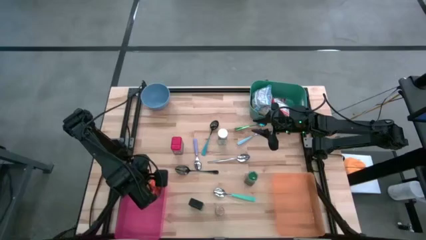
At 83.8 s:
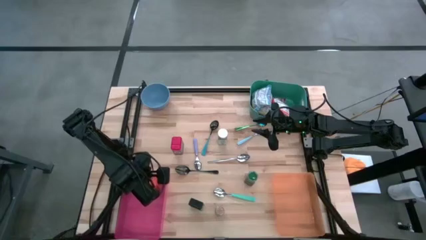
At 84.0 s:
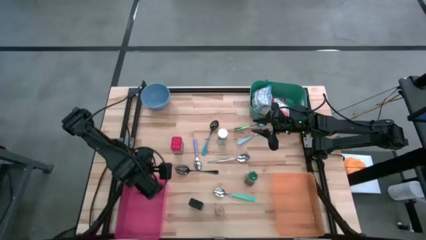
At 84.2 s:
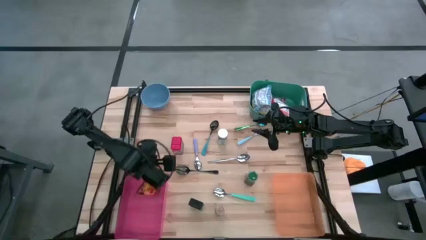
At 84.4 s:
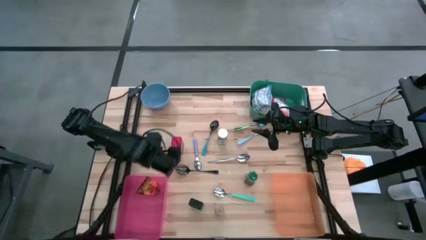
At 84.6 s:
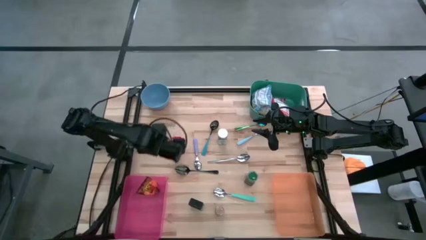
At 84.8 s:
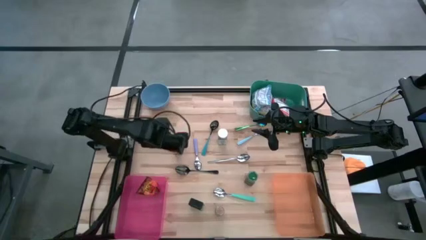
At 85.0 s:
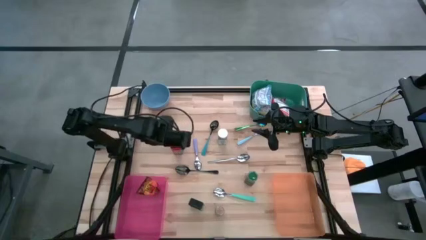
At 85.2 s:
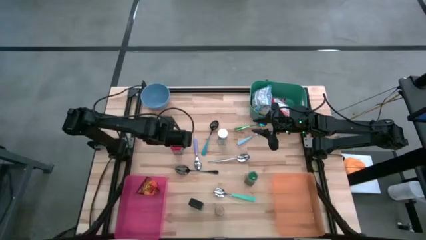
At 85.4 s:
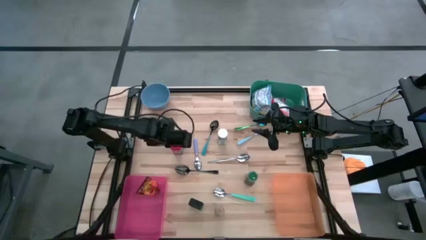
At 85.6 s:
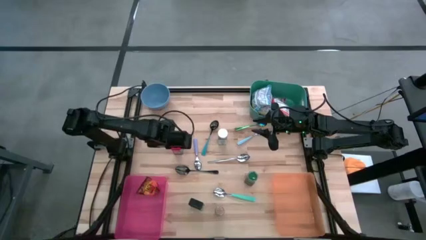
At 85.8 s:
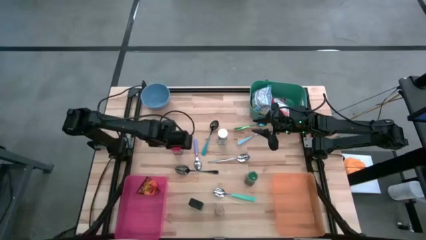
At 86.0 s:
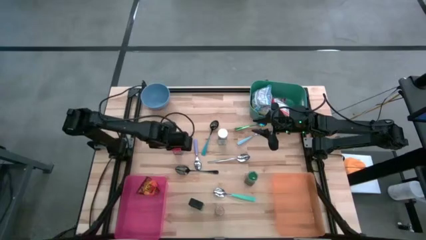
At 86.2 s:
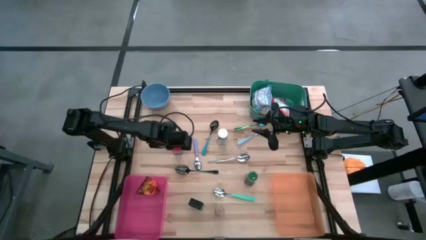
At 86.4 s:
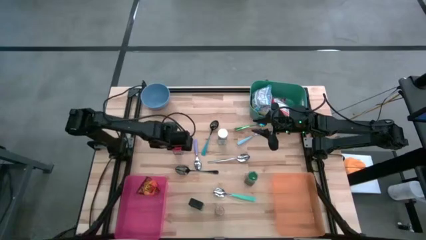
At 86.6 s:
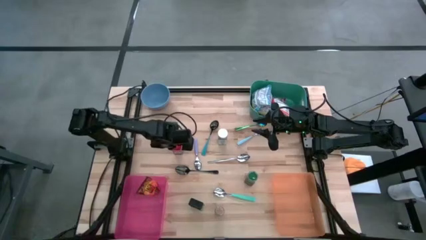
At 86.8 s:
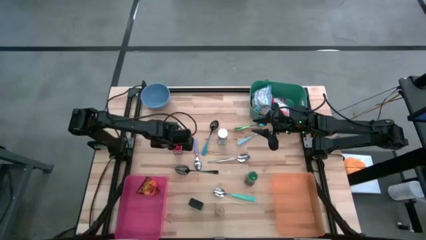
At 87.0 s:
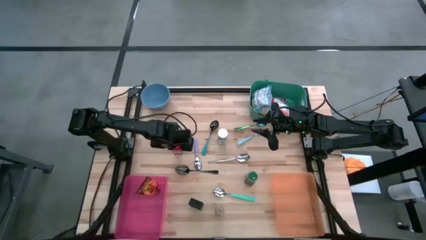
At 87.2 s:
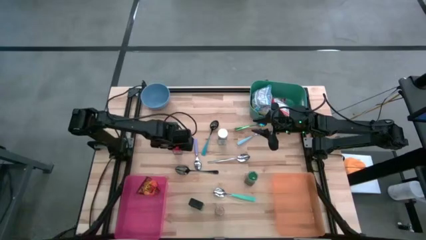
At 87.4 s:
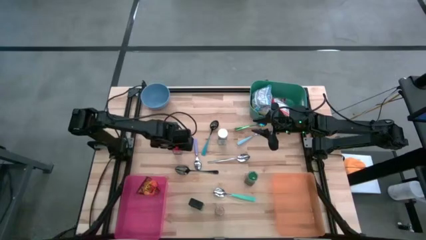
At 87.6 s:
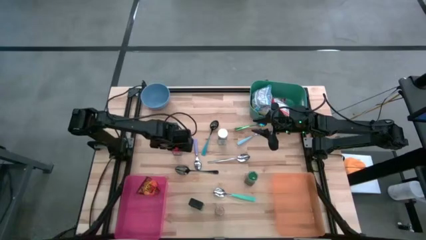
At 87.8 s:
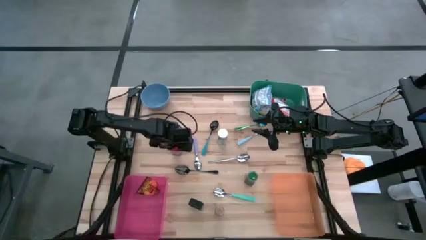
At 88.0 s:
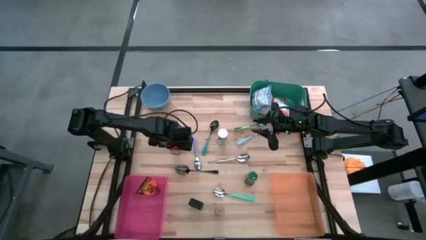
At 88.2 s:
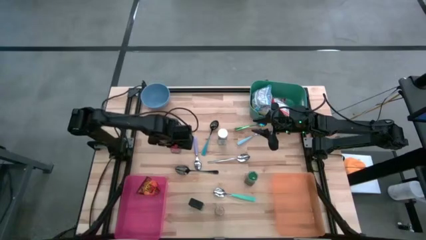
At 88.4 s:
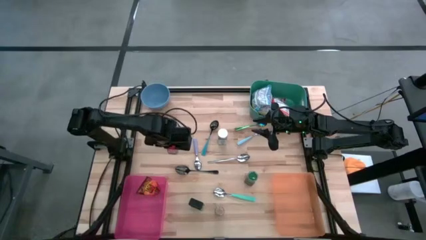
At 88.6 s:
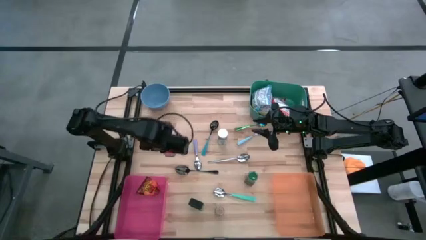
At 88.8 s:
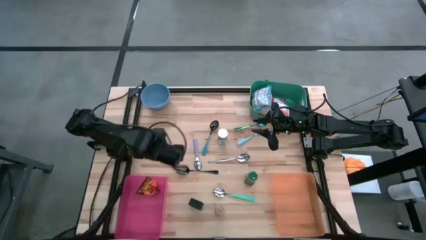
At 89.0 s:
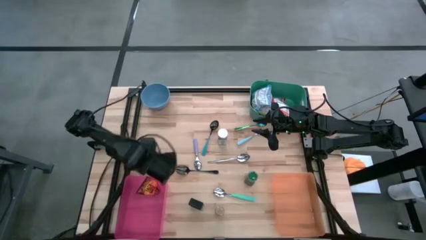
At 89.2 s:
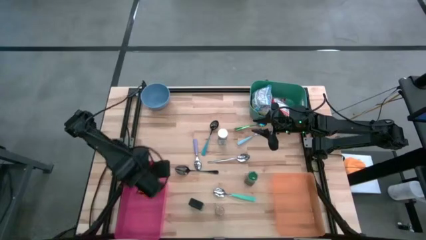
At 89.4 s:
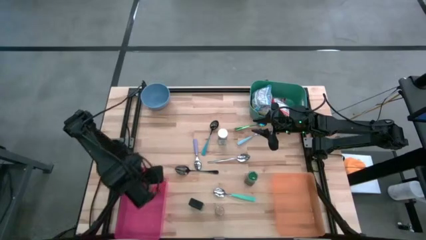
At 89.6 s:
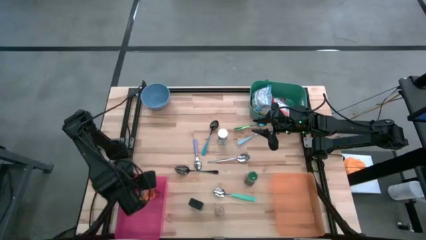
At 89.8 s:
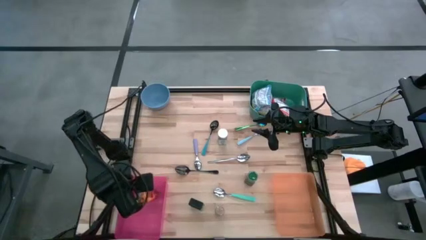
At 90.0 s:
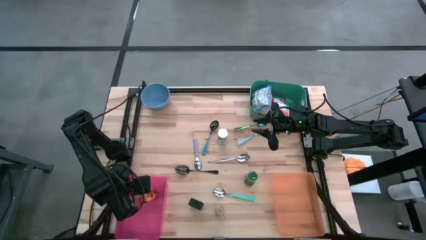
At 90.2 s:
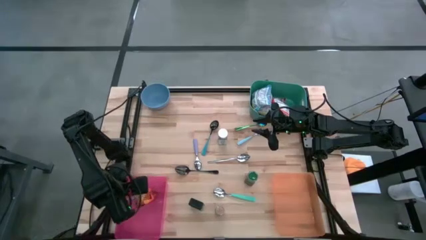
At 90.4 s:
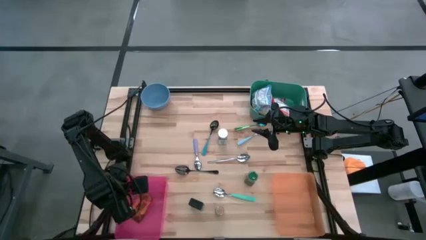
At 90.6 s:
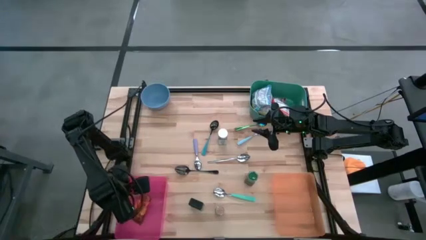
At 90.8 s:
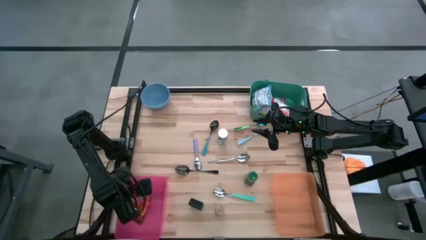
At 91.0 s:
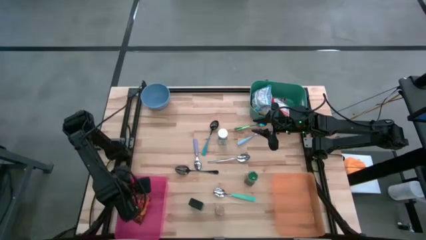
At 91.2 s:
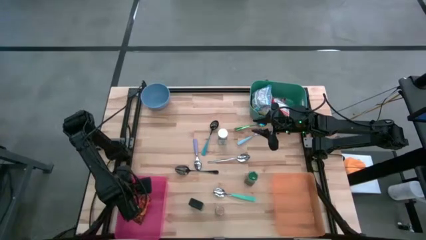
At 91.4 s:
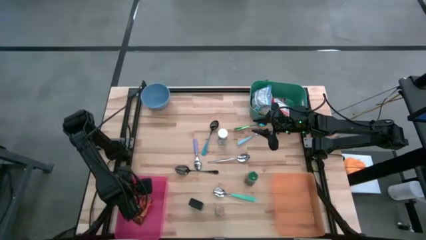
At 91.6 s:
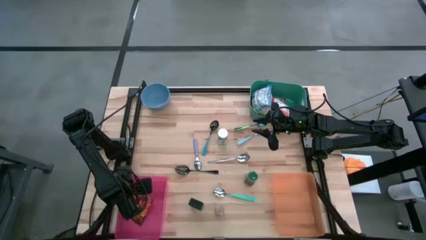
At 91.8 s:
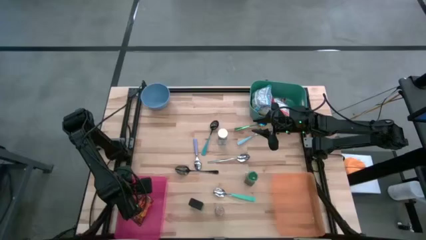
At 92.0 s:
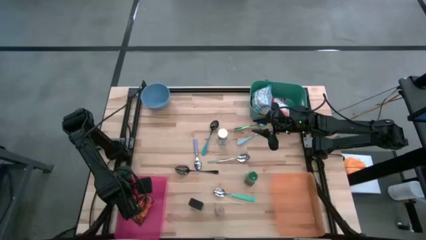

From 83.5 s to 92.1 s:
Put the red seasoning can into the pink bin

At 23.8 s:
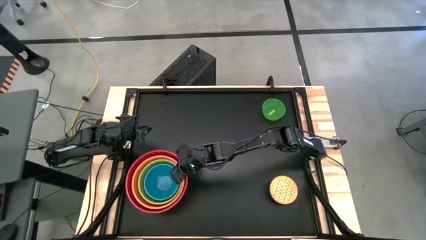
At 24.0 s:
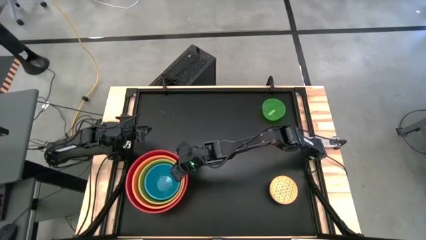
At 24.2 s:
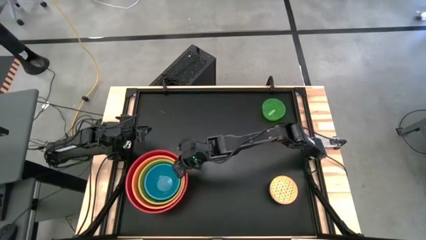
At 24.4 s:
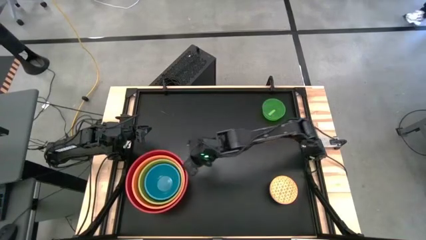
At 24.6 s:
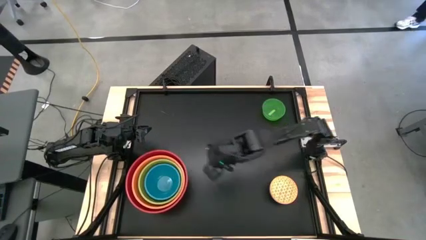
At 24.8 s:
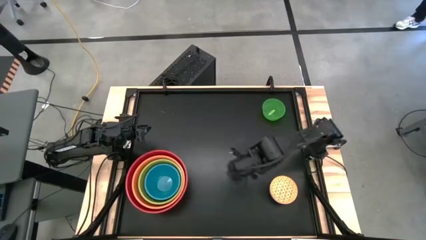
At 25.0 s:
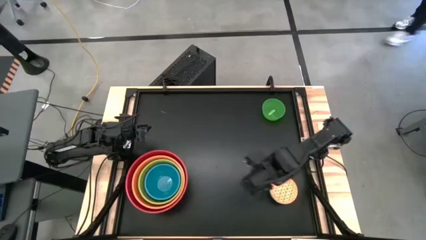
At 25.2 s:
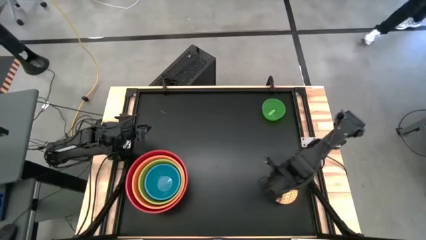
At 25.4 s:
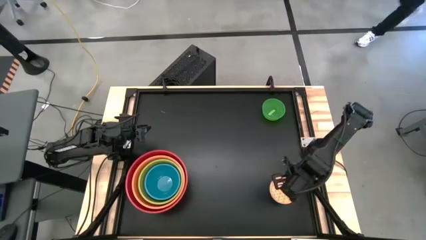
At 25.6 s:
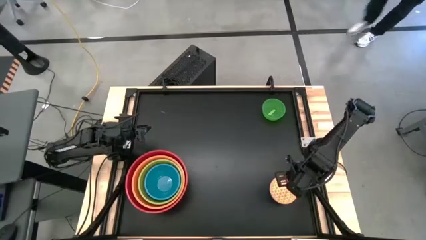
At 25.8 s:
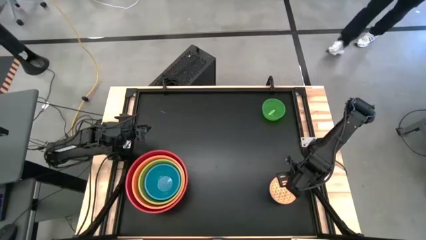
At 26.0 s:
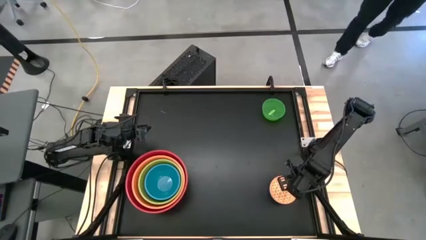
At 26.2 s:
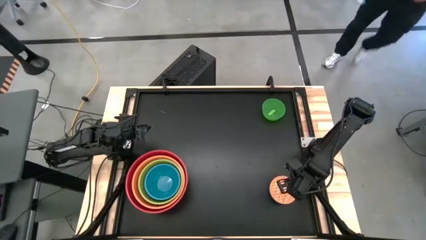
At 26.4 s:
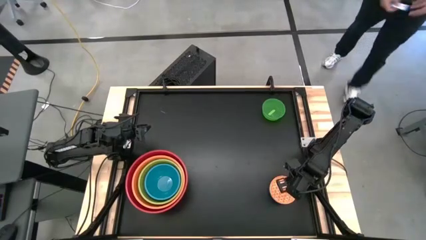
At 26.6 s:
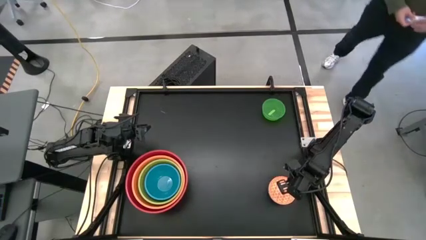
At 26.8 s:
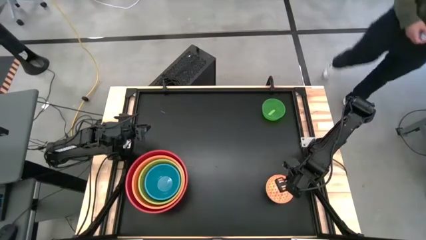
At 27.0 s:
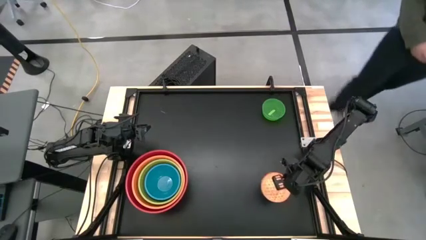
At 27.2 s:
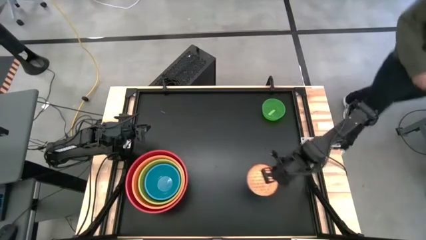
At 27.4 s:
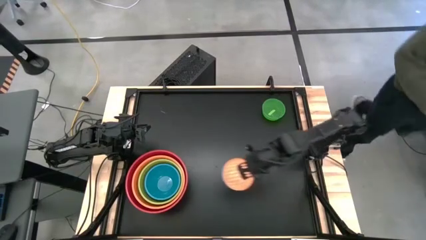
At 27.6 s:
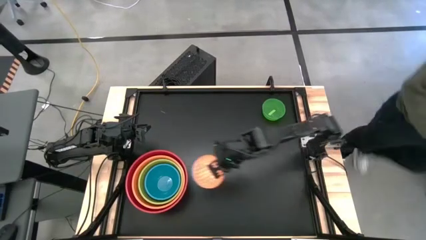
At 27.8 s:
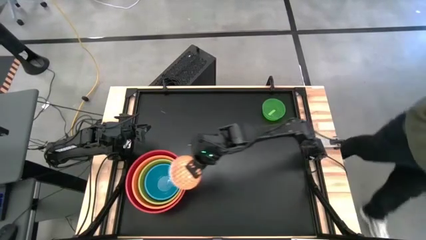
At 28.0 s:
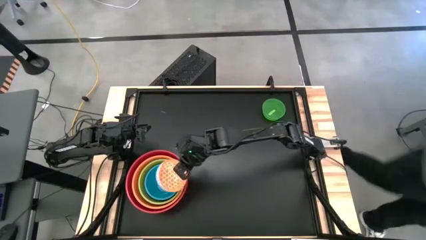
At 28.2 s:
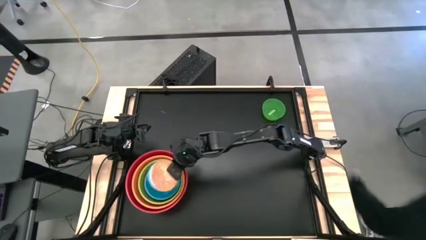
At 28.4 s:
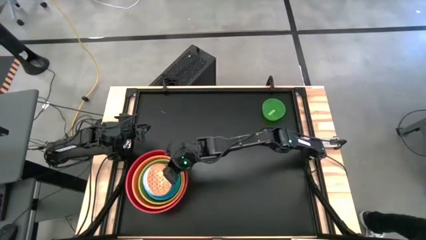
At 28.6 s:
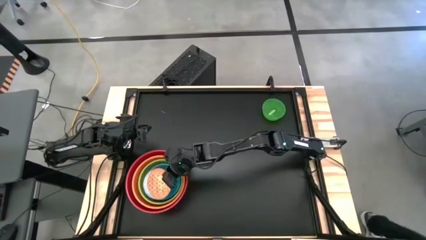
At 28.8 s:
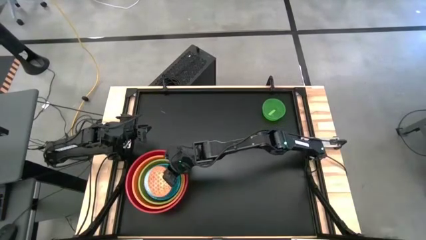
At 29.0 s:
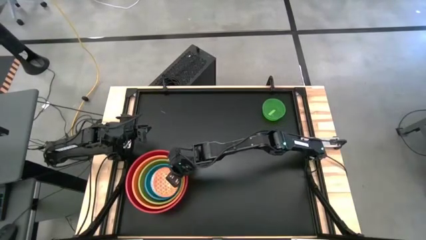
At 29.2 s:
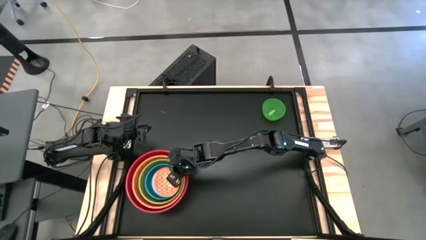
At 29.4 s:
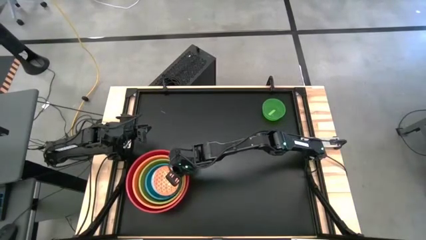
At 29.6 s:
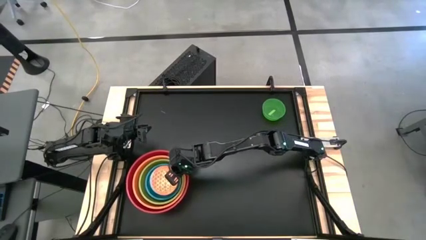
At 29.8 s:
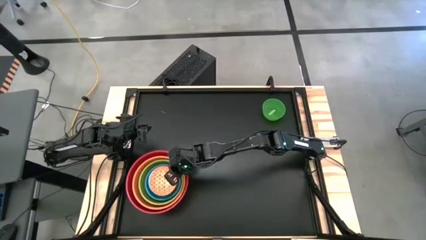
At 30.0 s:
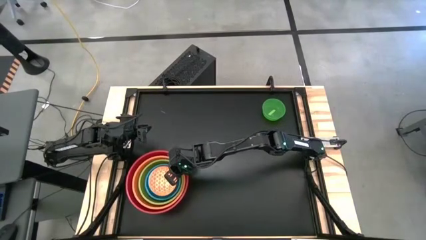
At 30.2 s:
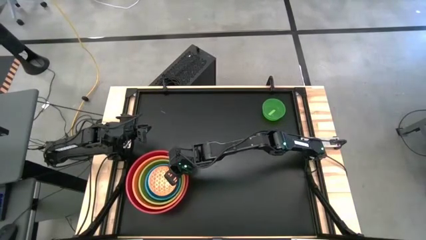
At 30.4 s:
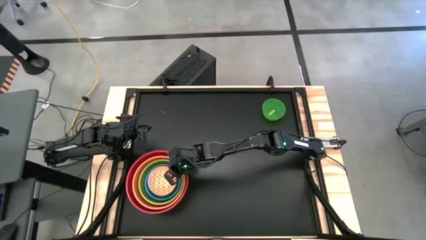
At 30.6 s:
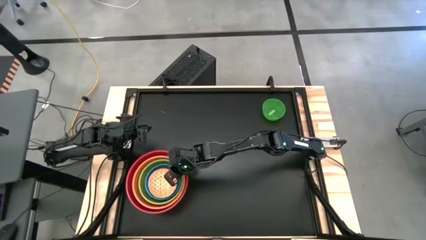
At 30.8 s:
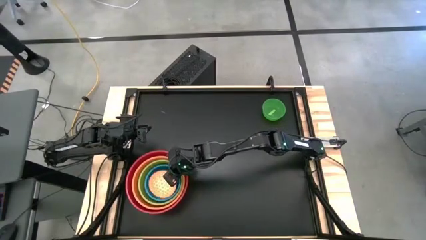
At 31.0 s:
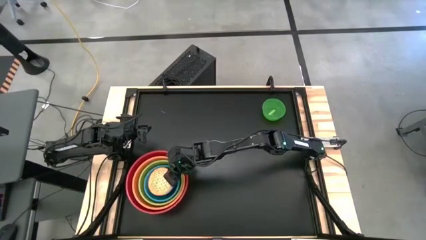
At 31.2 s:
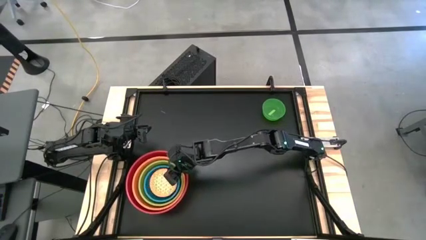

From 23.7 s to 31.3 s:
Stack the orange patterned bowl on top of the blue bowl
